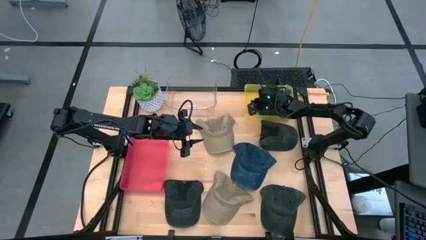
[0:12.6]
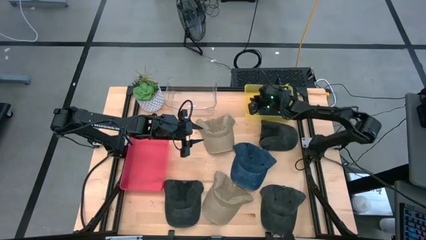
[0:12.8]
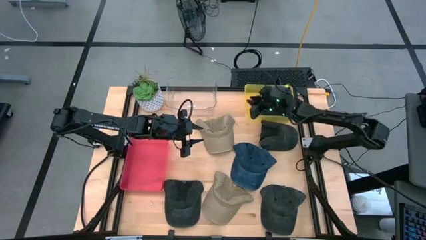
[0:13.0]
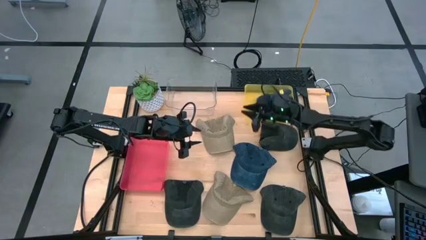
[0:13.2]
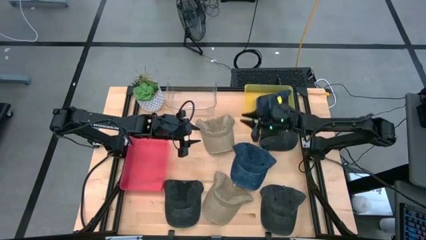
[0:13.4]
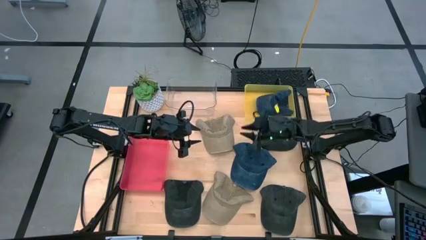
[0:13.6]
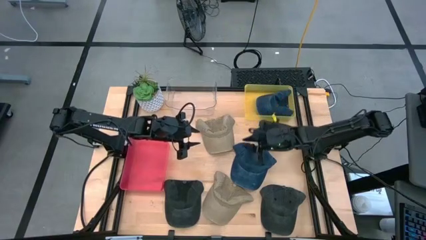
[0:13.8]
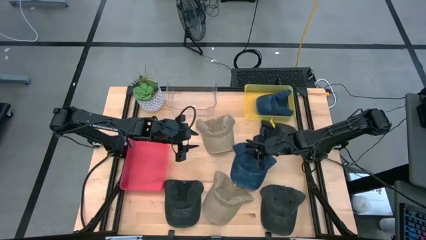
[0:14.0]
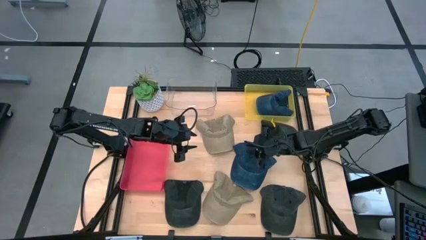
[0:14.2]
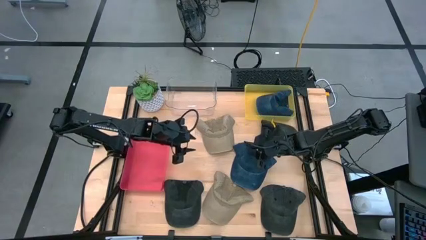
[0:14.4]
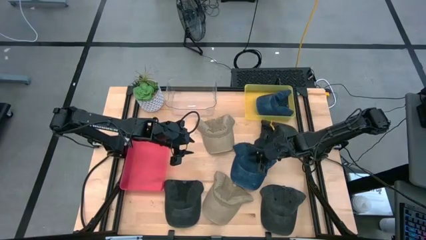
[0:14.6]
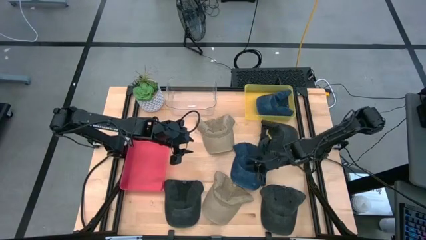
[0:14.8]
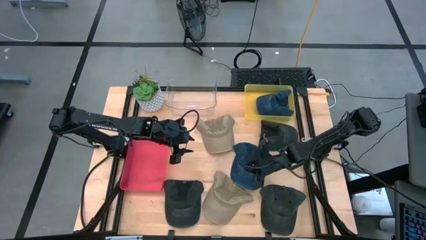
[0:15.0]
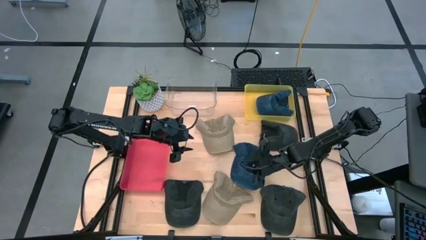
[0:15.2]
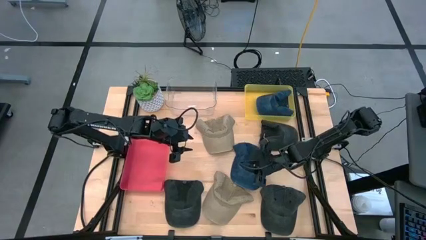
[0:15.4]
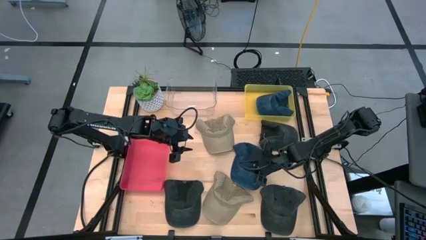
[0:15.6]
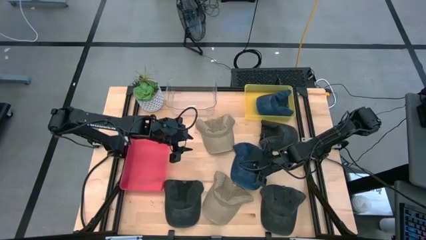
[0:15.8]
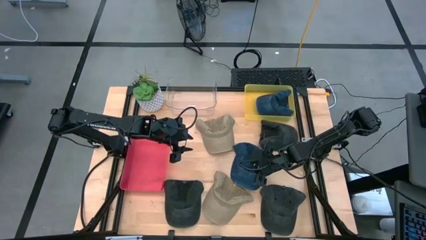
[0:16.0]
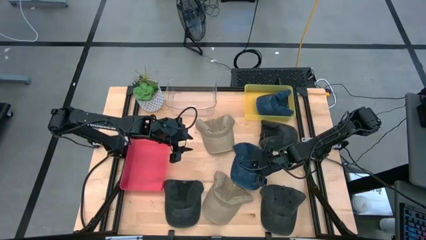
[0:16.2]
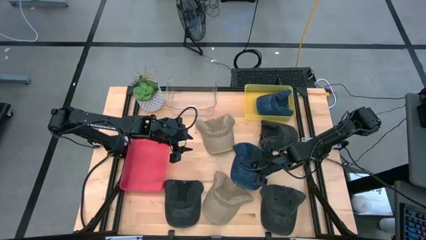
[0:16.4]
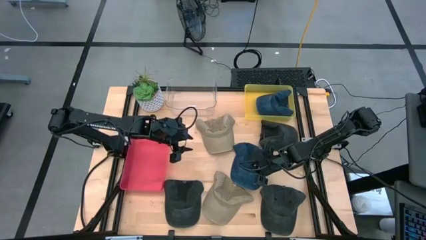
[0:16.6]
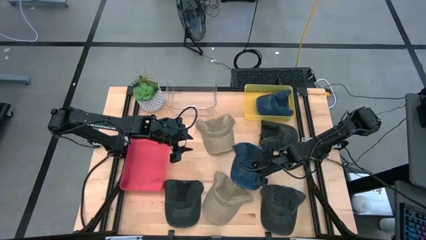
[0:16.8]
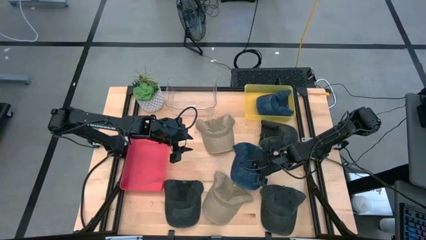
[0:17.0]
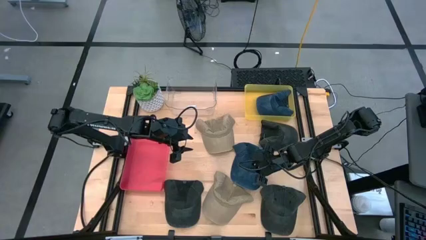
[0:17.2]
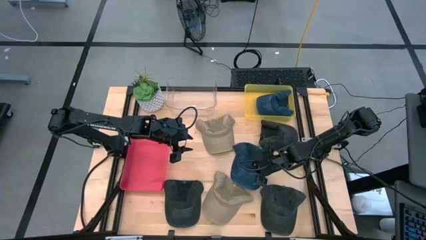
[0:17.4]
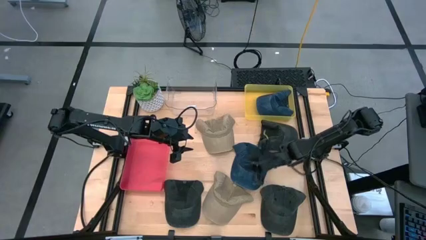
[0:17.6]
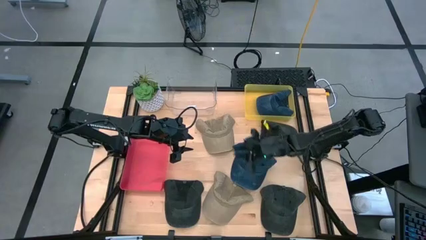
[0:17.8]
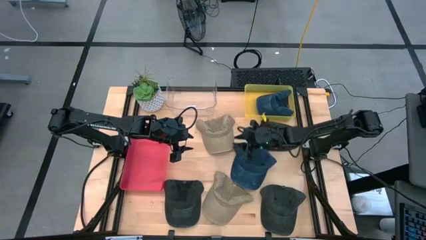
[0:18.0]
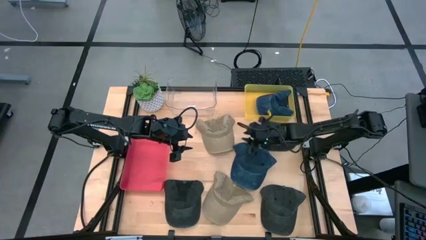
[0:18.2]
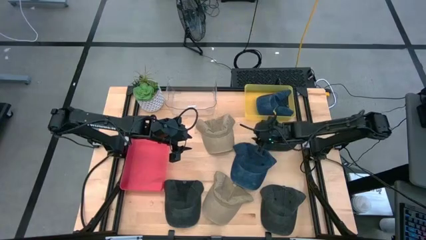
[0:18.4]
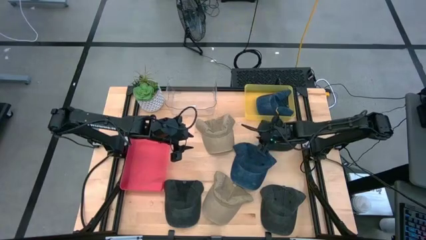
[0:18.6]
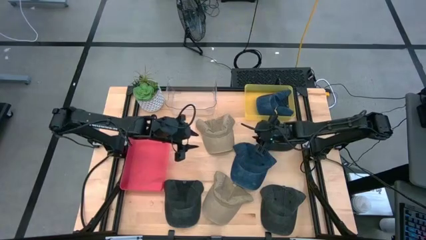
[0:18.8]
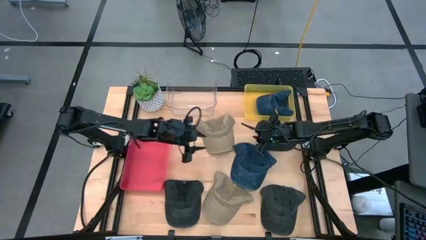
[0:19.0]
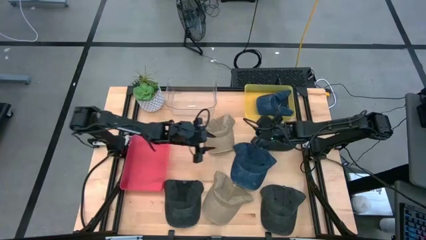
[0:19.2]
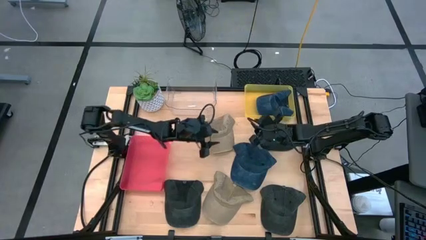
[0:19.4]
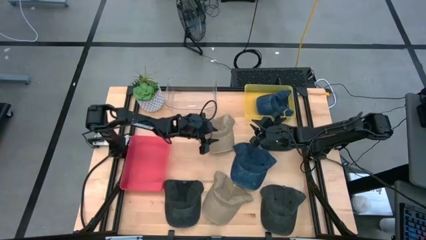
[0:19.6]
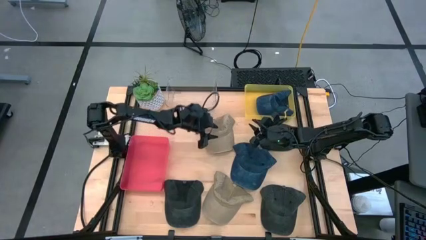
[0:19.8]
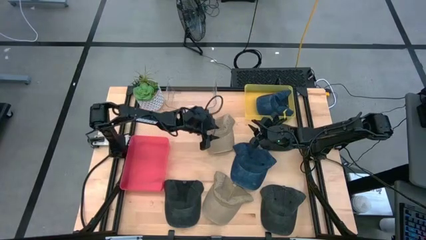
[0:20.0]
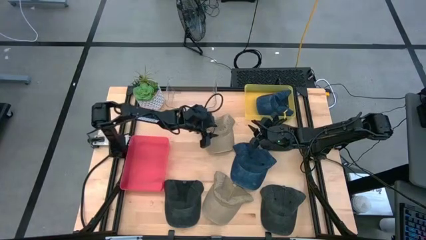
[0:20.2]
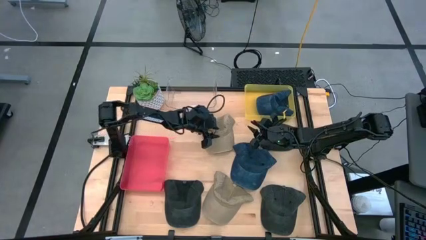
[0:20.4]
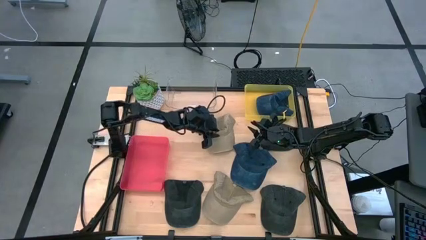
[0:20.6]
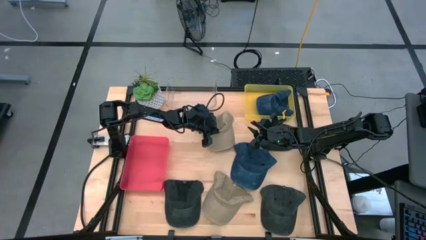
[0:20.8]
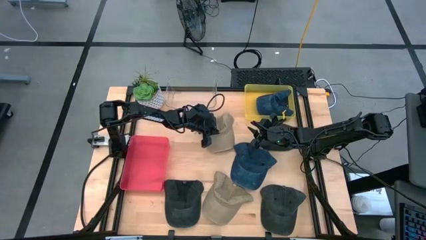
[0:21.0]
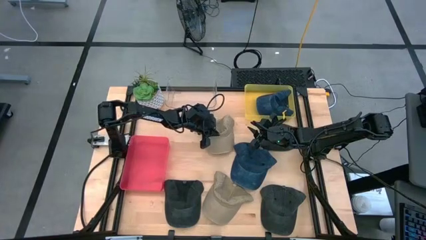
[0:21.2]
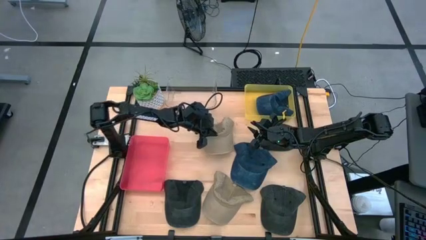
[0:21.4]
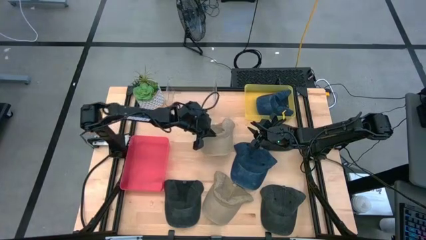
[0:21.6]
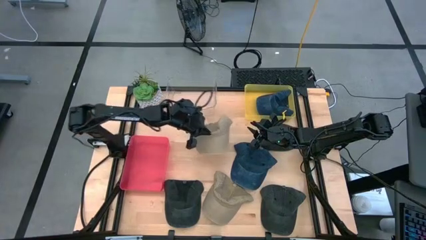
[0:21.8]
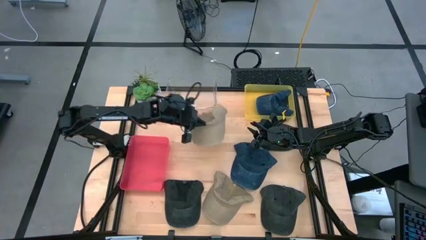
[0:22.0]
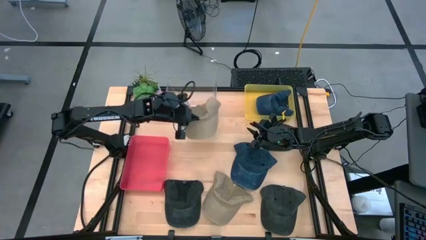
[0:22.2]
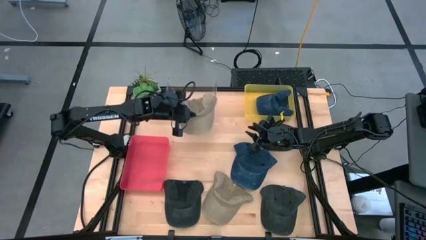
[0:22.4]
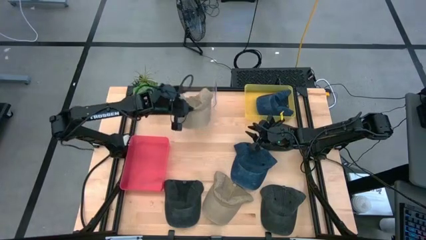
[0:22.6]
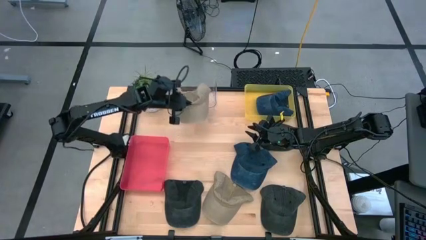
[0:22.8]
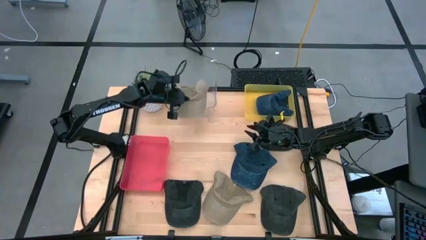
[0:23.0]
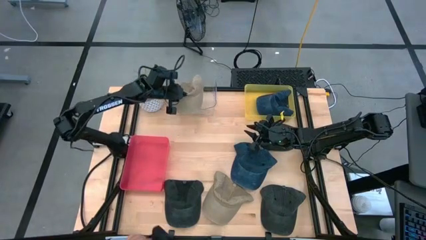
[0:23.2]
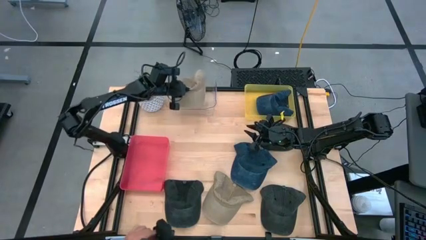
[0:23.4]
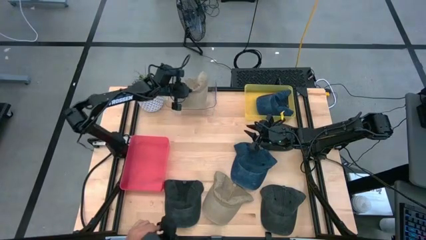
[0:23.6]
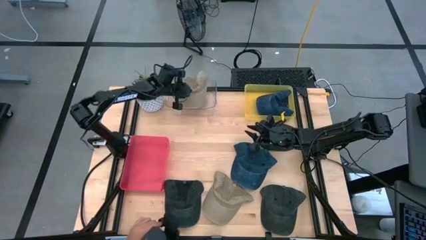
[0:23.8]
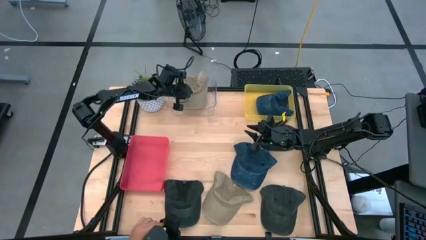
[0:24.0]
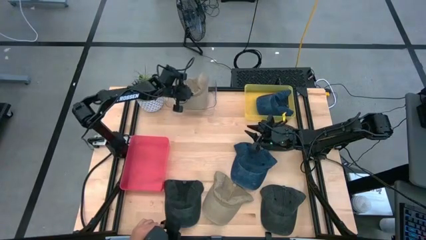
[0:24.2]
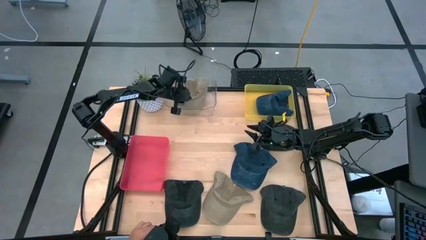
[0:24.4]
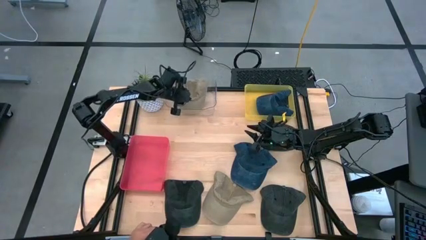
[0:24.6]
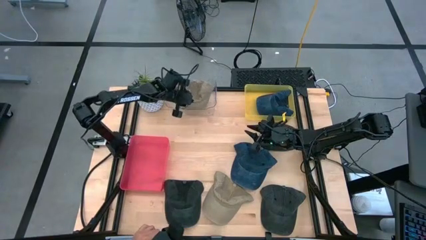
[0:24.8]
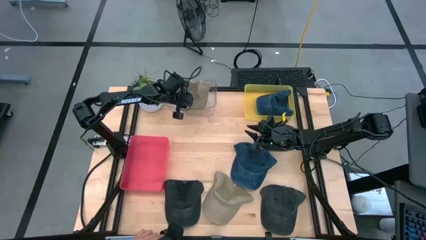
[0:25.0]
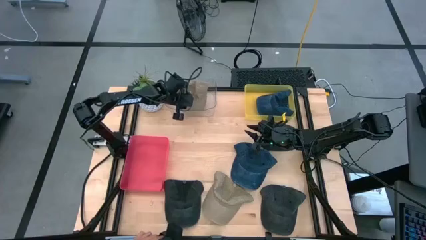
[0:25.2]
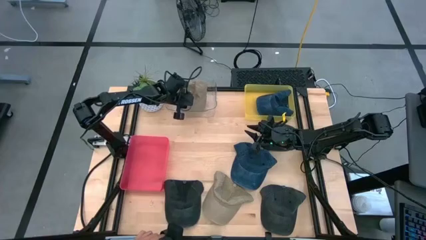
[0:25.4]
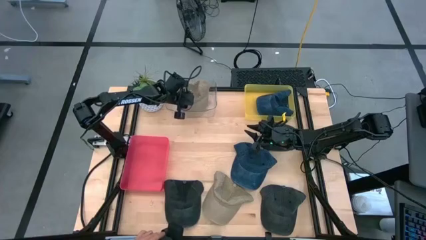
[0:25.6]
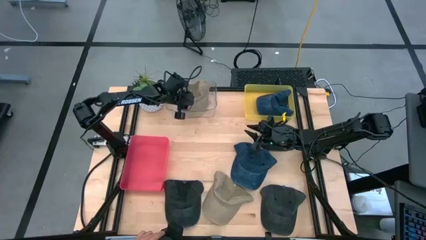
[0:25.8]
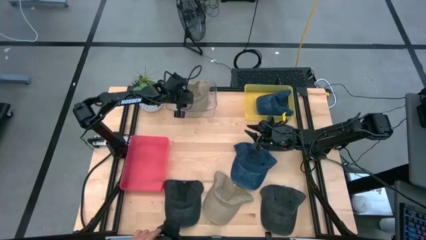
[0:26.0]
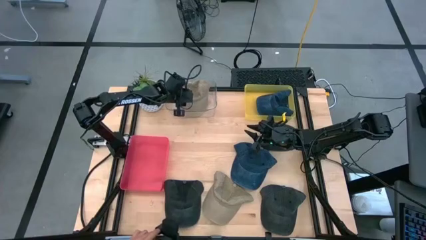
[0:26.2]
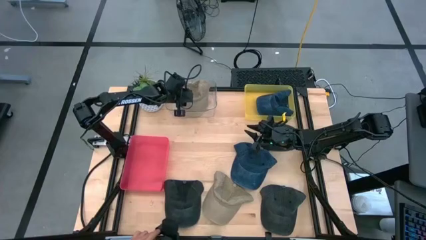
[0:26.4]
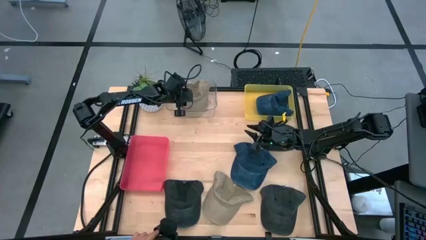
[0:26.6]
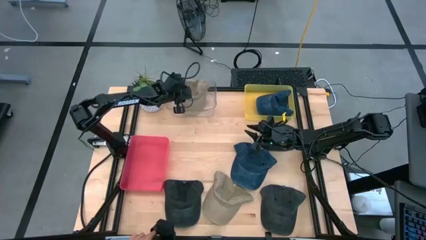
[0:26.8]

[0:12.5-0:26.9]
Task: Pick & Place hat
Put the top brown cap into the transparent bin
